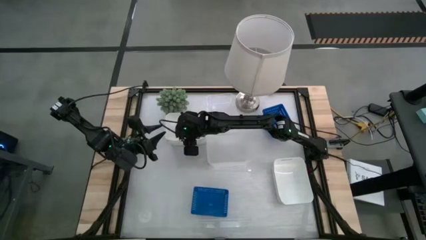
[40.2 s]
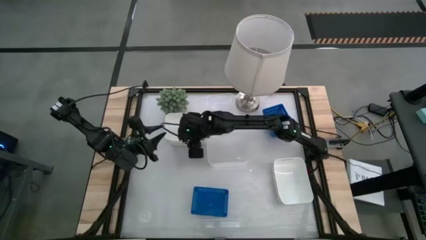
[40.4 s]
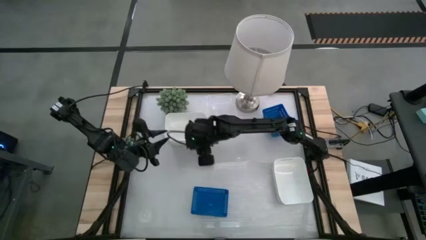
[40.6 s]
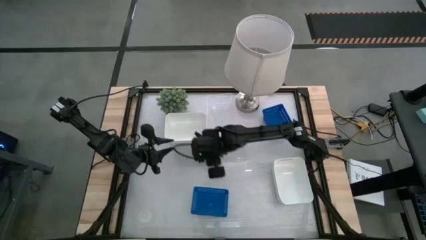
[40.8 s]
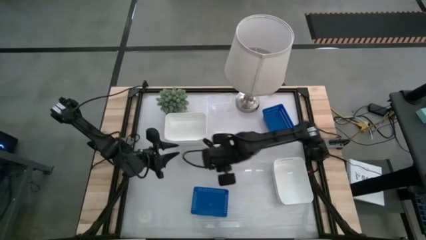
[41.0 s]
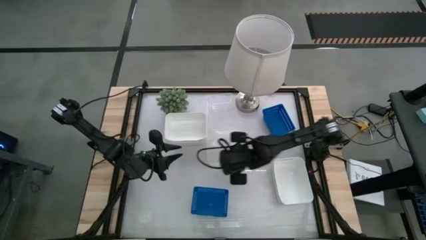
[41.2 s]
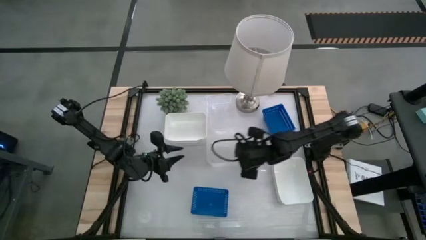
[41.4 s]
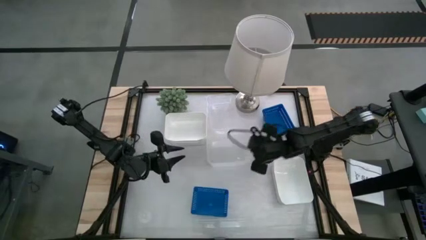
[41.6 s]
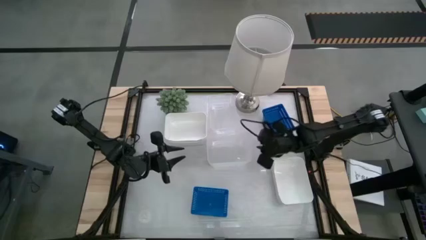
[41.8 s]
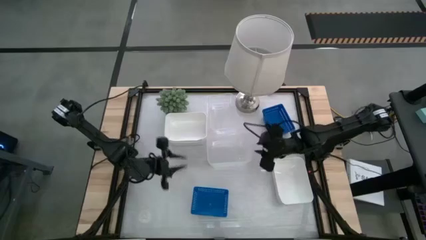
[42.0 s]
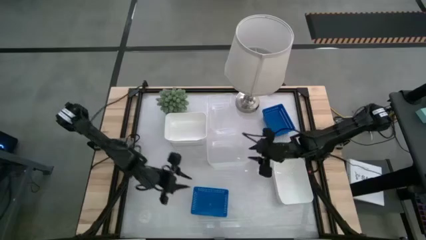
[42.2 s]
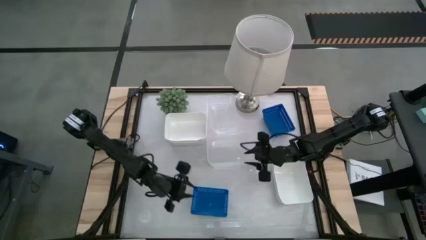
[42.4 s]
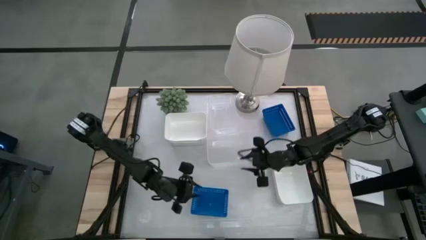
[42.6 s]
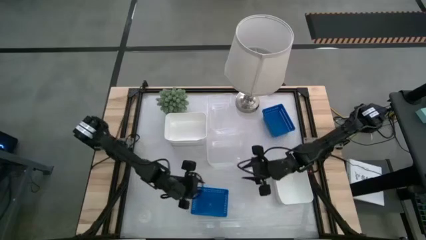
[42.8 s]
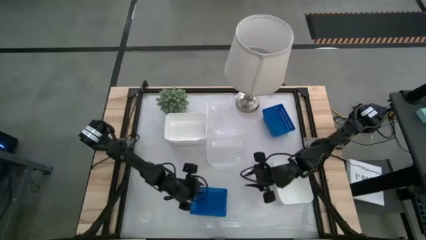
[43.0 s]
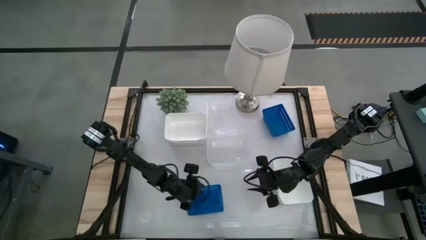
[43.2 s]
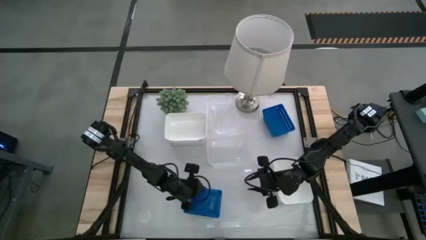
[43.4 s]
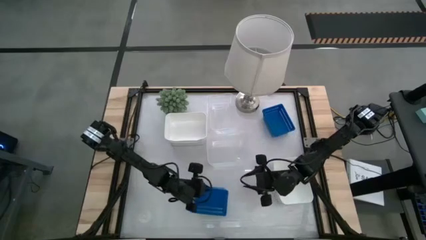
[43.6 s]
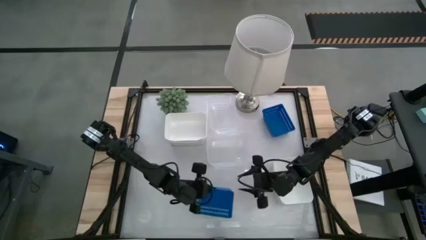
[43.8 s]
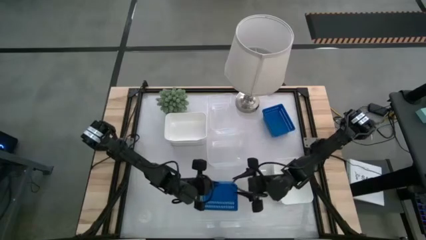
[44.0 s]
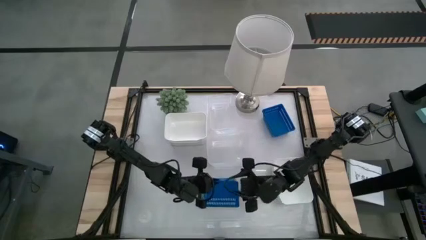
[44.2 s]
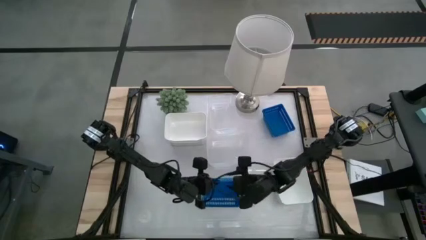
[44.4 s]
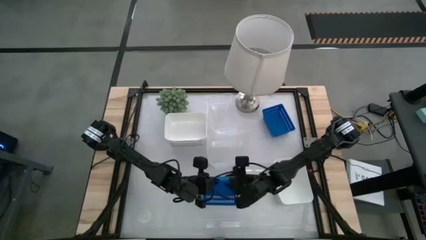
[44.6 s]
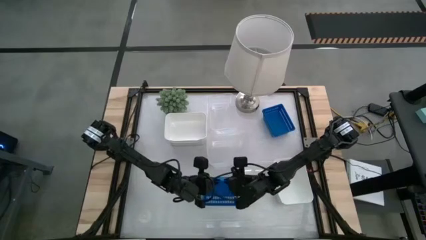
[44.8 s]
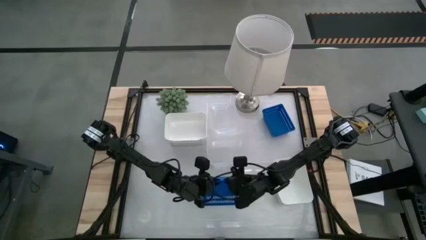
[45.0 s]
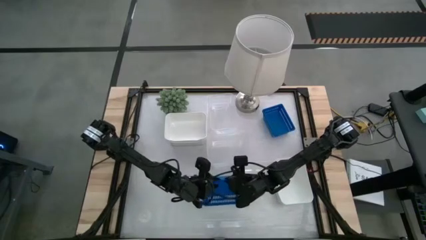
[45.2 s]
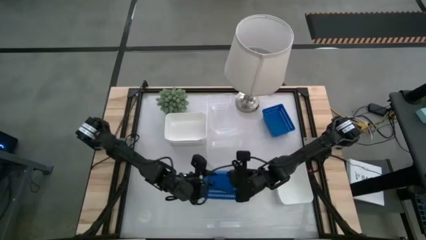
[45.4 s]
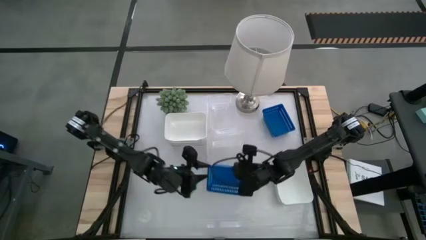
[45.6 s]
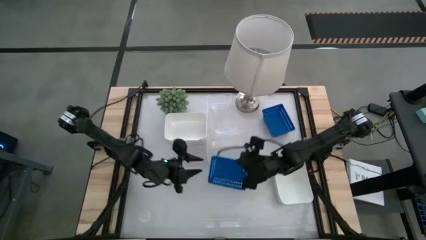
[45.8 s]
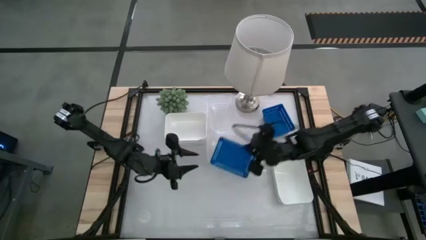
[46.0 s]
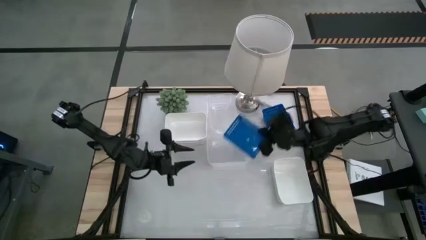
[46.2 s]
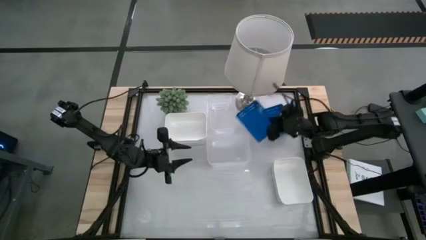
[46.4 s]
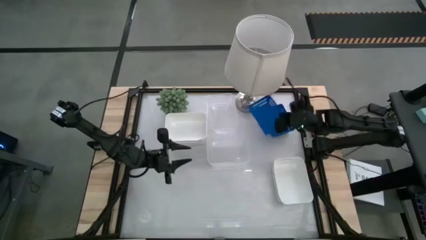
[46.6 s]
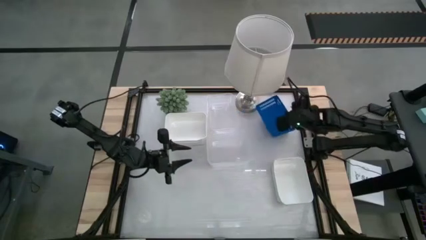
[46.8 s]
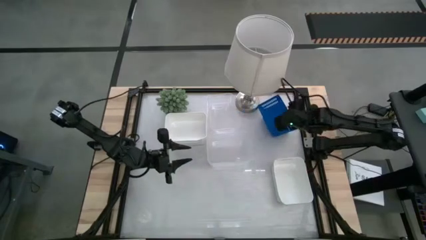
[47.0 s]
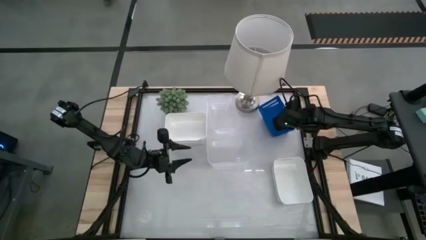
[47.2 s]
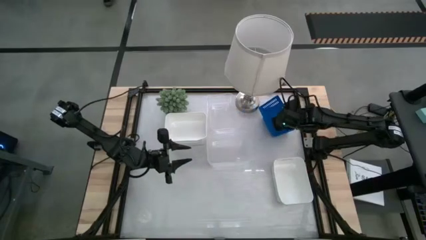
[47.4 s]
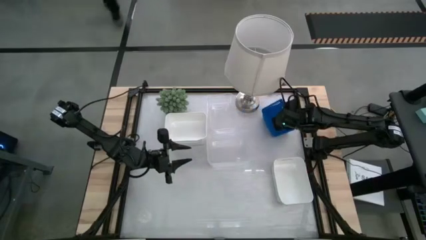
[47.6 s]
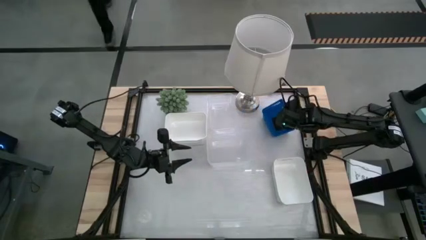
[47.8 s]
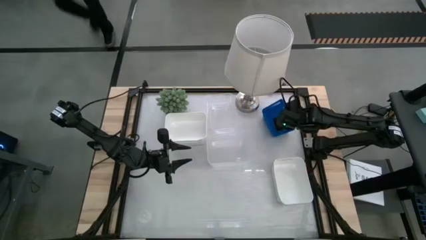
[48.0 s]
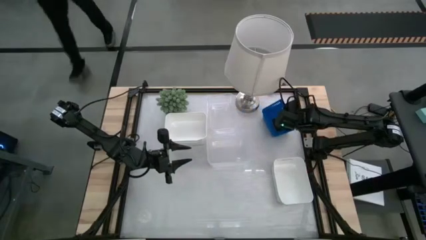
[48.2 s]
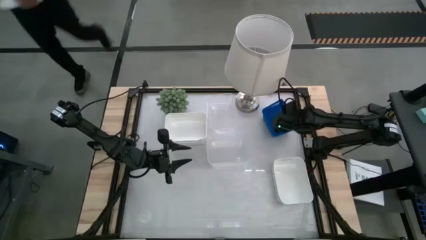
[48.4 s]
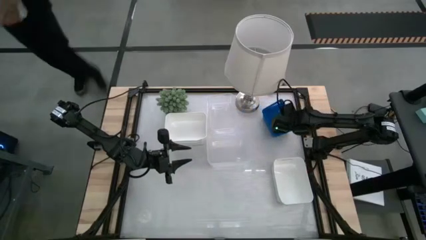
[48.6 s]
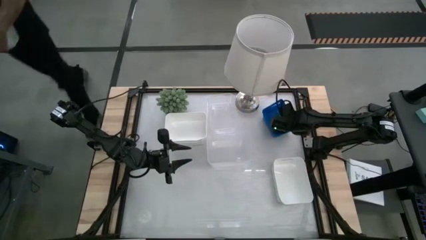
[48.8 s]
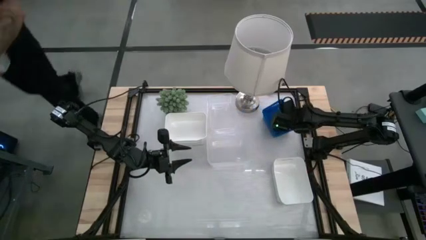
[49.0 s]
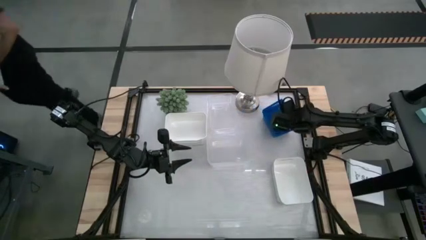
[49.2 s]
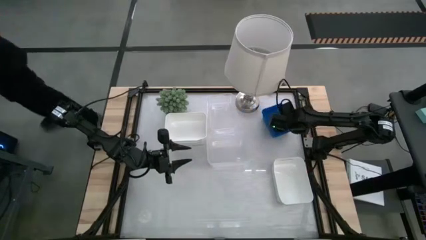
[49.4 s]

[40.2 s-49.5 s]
Stack the bottom blue bin on top of the blue bin

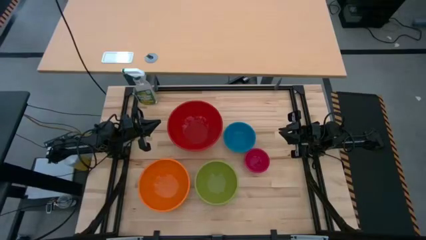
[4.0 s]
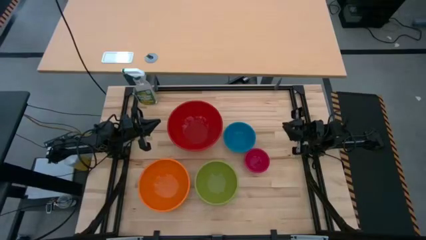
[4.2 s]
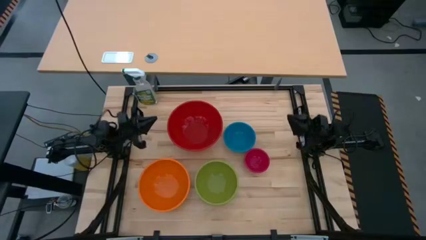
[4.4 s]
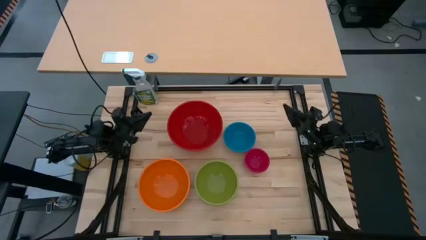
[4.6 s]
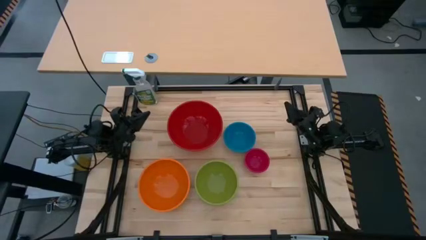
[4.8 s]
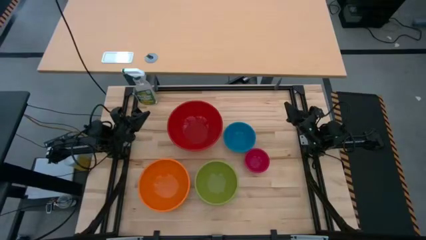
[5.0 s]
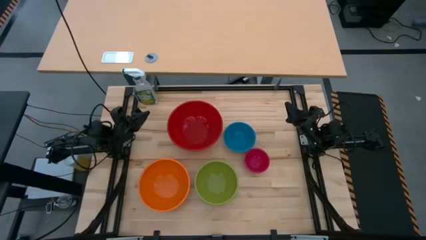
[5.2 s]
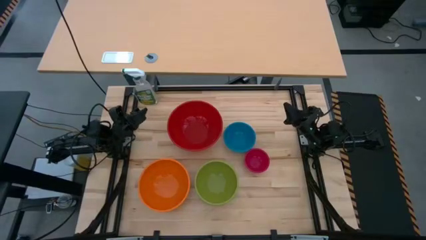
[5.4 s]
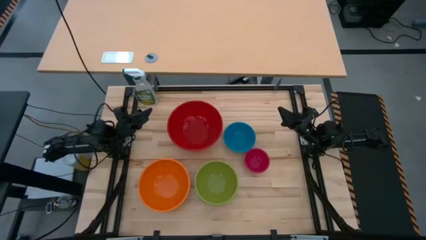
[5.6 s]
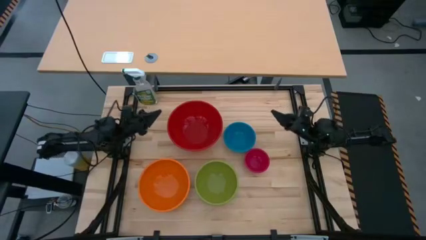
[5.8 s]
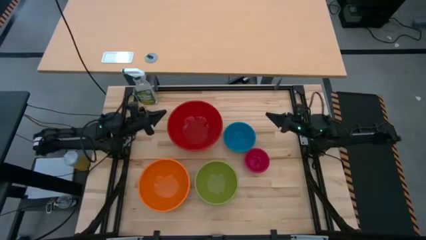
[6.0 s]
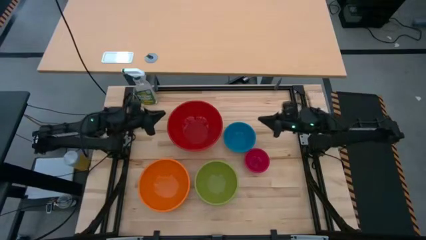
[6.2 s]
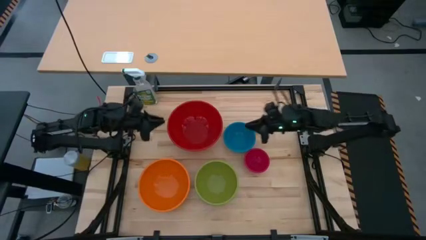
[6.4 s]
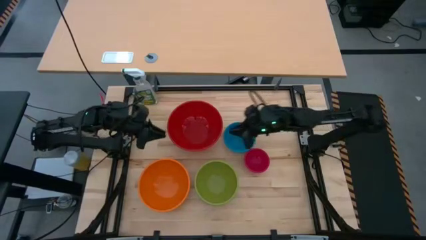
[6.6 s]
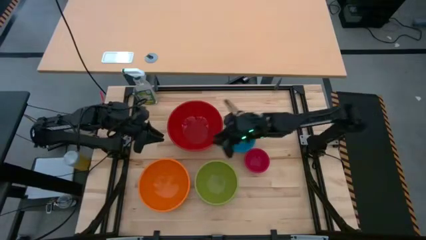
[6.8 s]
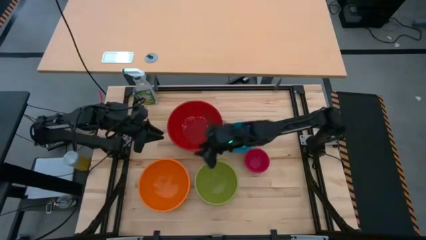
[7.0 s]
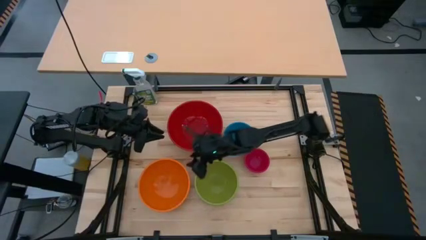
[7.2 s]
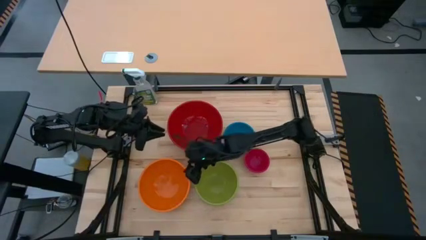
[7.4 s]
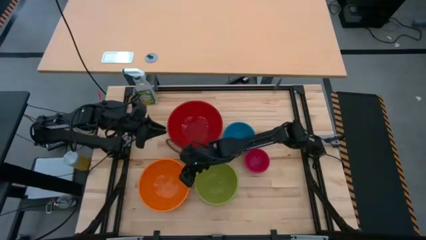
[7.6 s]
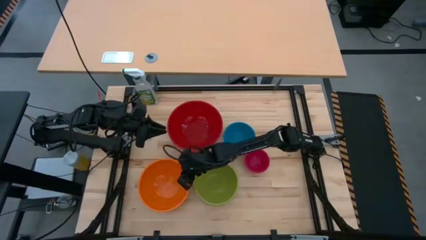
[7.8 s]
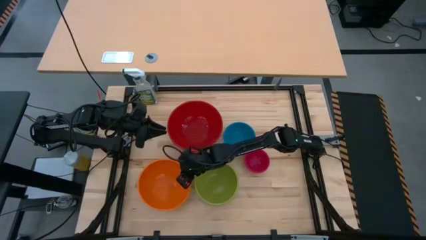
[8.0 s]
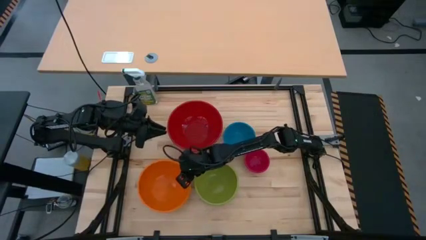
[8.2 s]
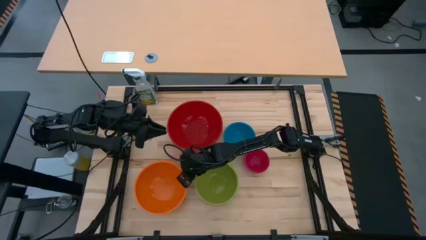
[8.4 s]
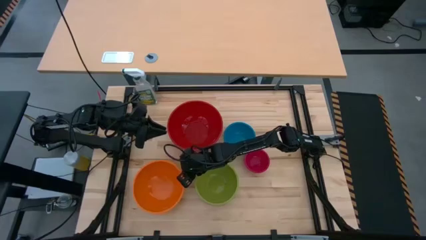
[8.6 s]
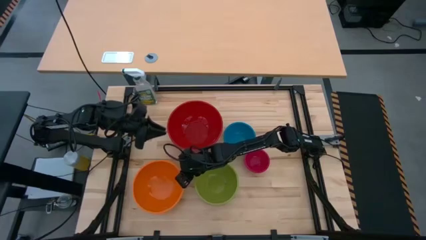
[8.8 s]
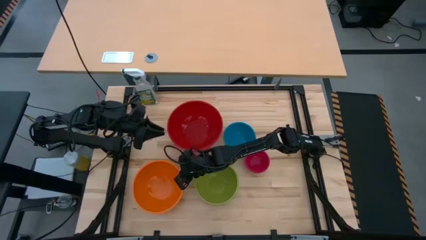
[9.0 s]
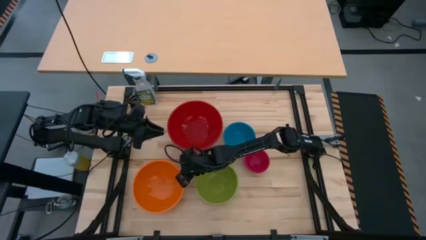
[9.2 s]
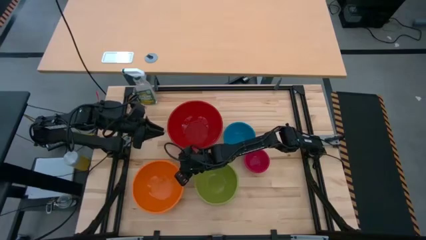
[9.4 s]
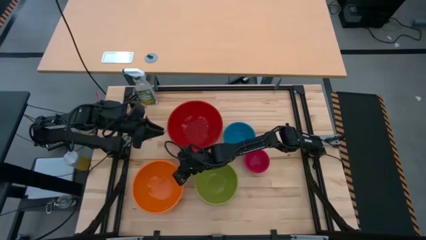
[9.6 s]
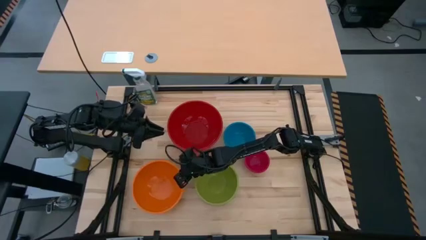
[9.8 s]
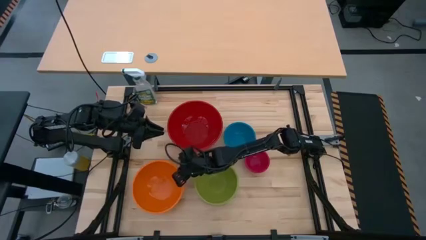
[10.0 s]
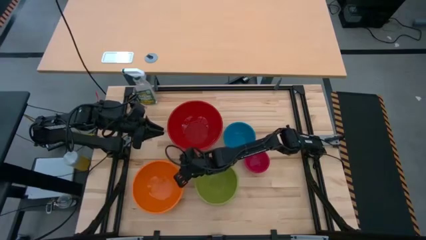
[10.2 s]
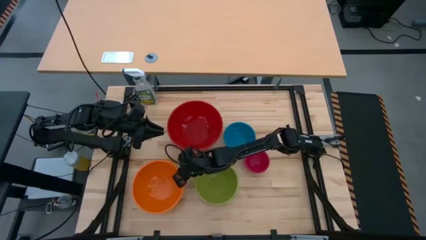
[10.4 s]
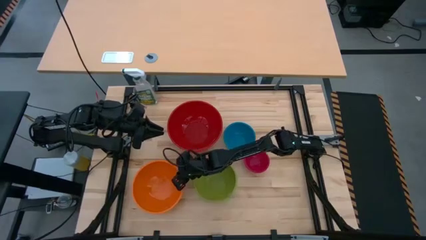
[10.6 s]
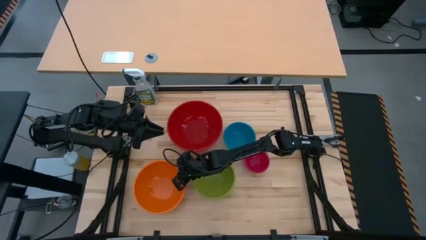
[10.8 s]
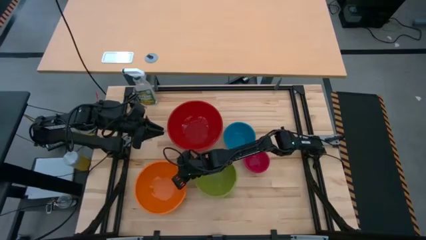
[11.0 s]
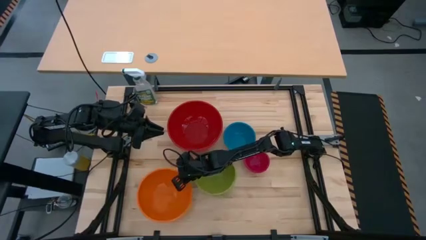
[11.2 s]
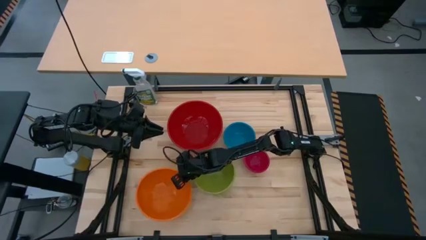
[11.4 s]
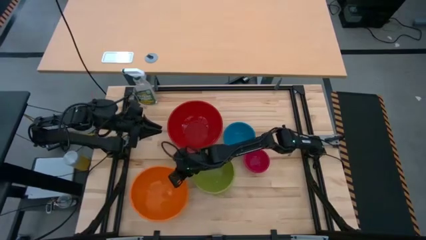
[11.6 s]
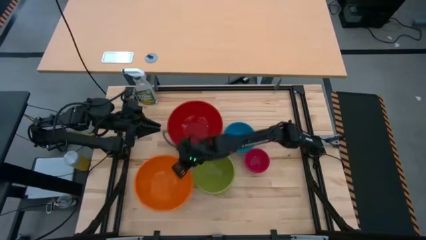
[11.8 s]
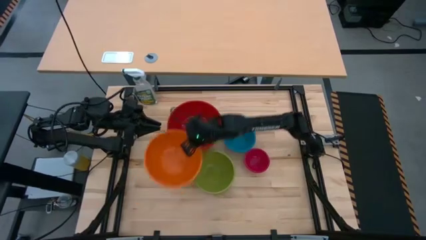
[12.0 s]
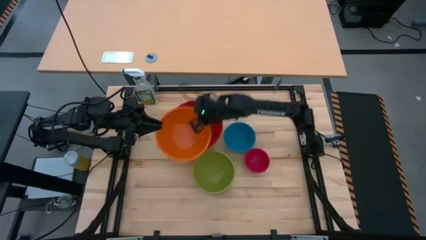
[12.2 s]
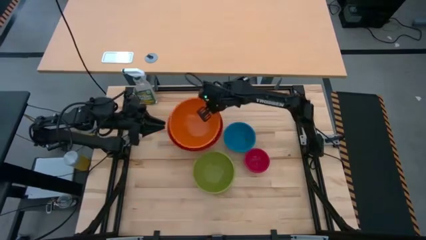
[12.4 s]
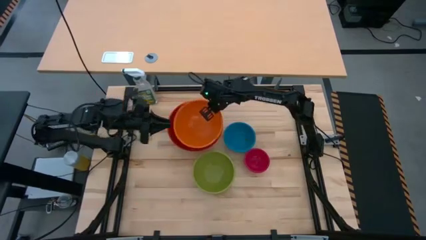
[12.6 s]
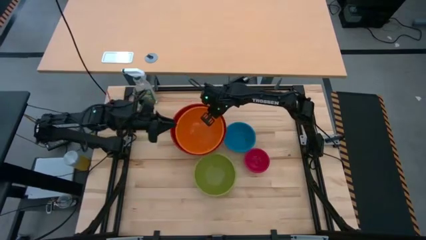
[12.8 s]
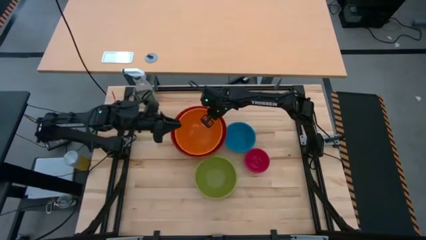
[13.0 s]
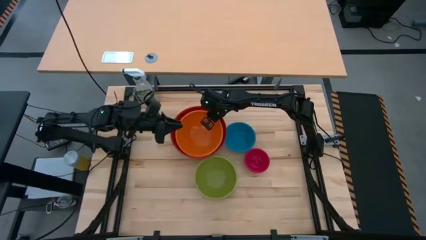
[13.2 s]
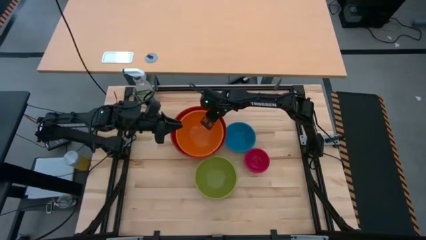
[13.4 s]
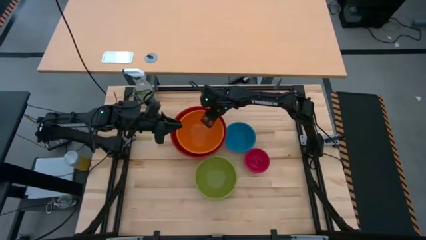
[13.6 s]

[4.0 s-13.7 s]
Stack the orange bowl on the red bowl
